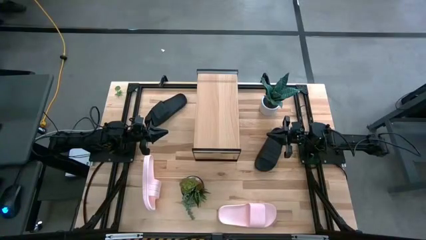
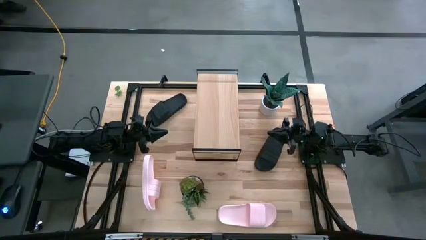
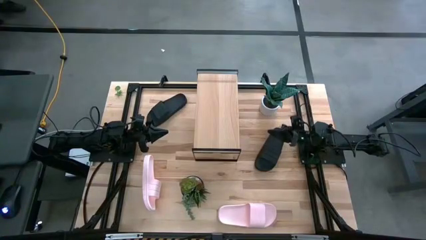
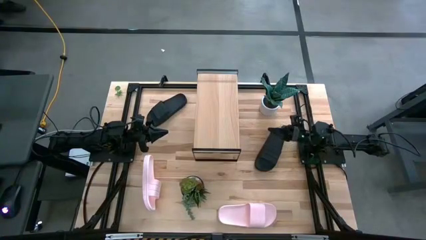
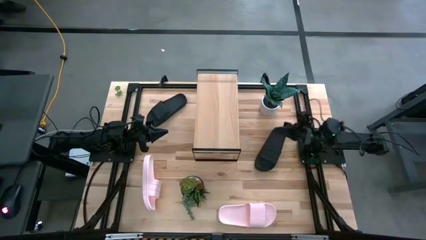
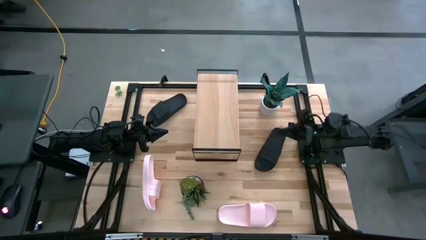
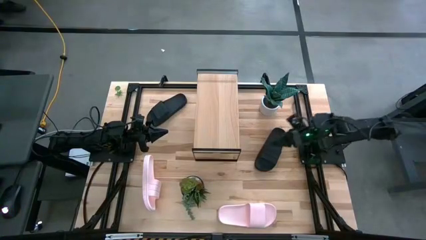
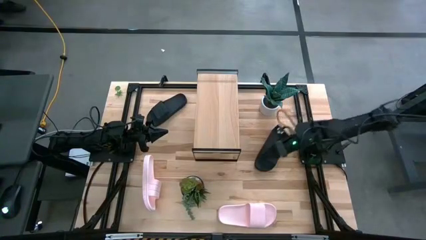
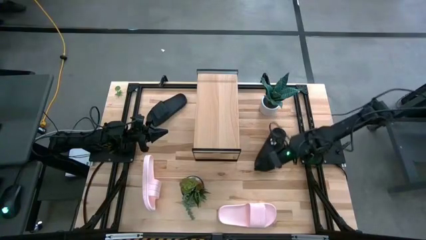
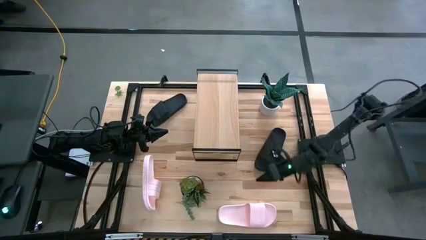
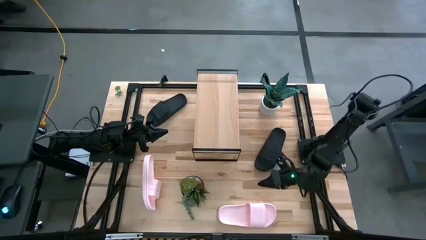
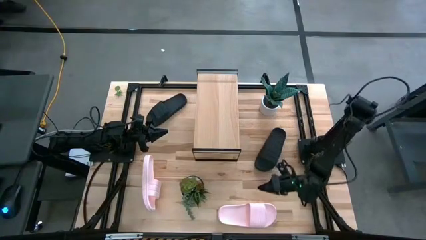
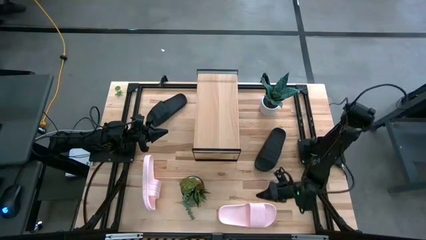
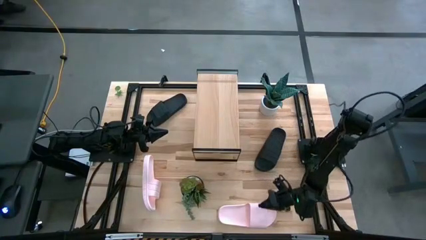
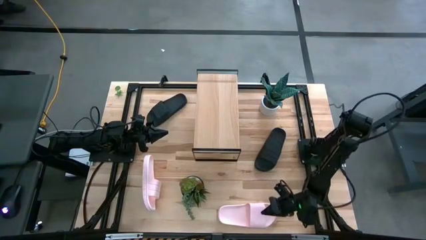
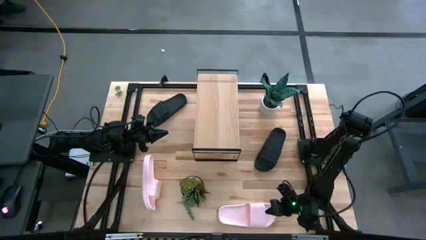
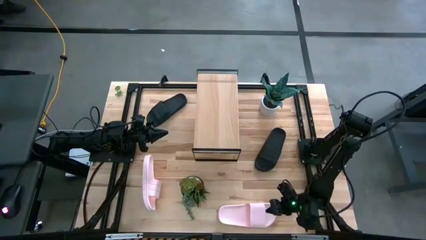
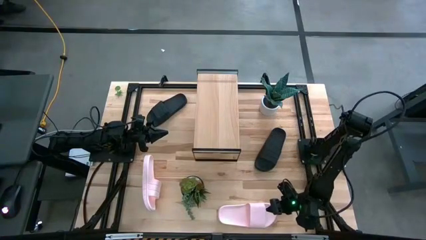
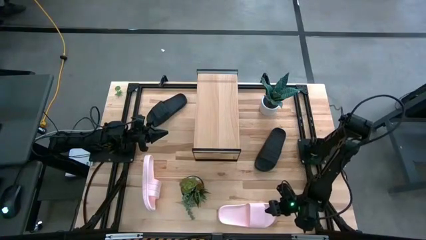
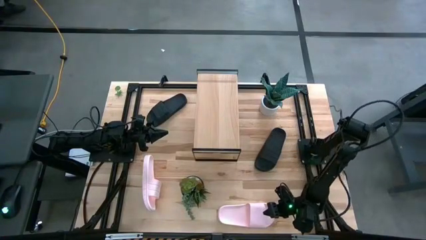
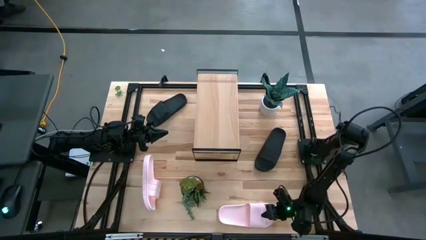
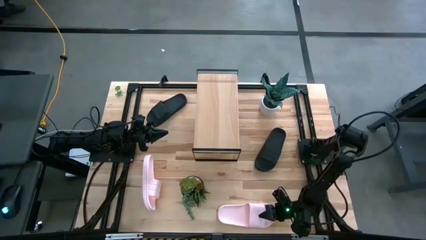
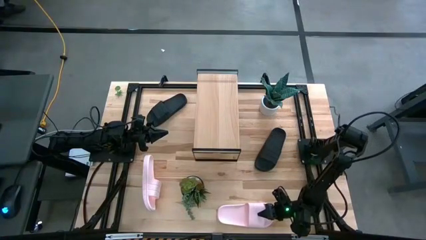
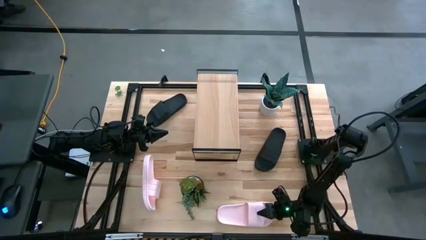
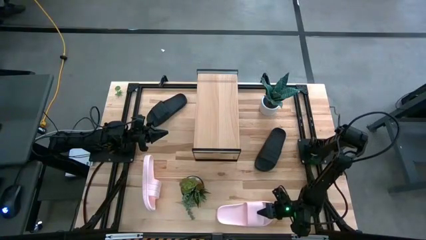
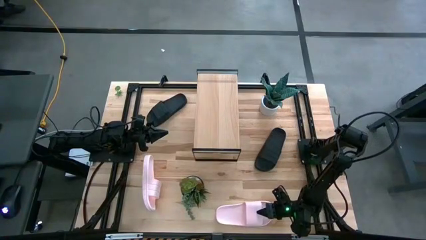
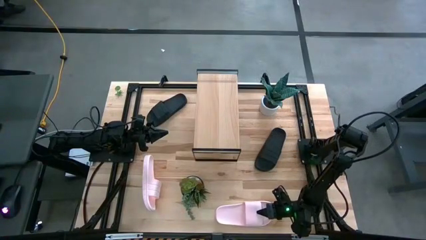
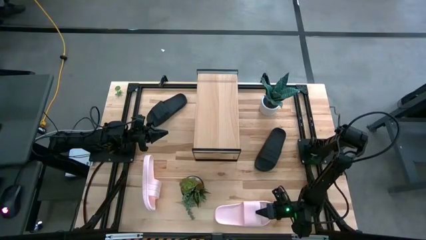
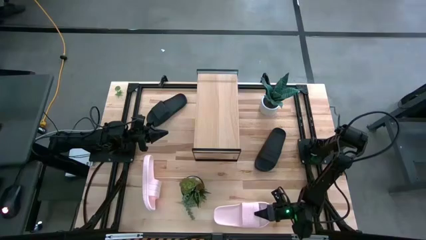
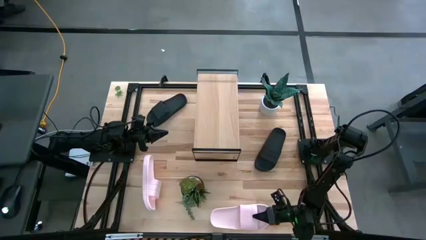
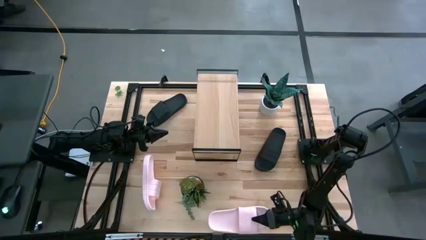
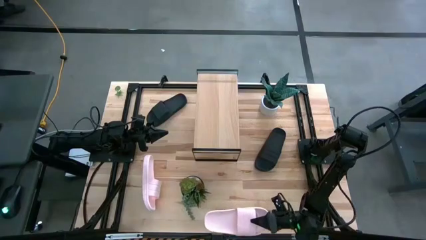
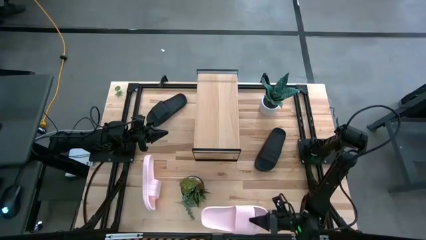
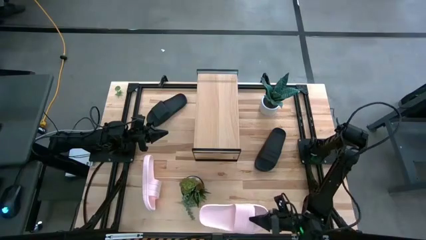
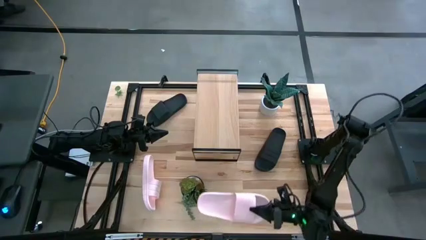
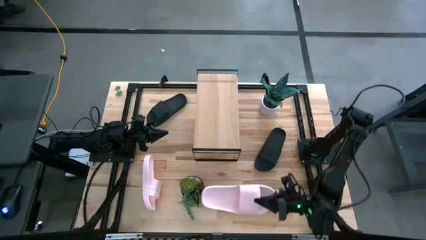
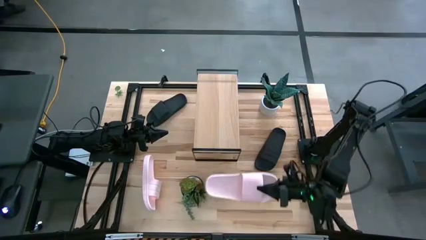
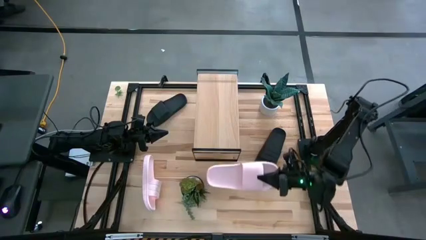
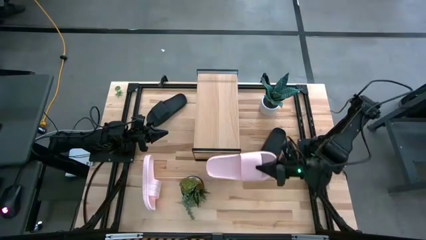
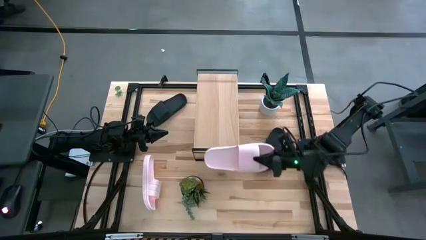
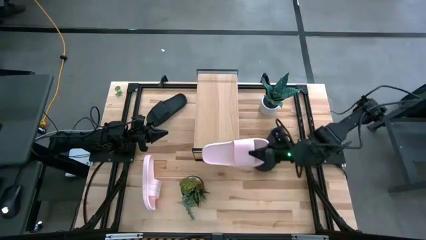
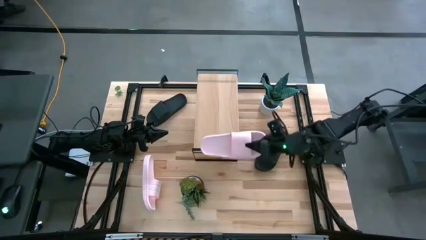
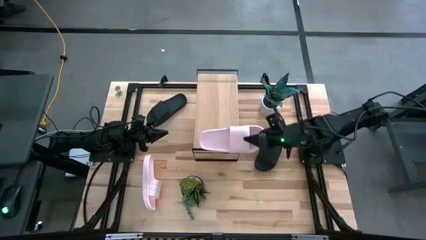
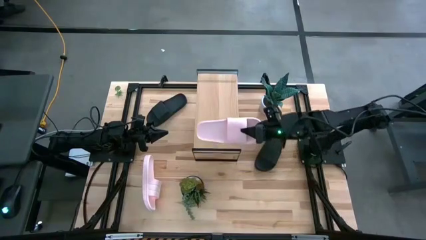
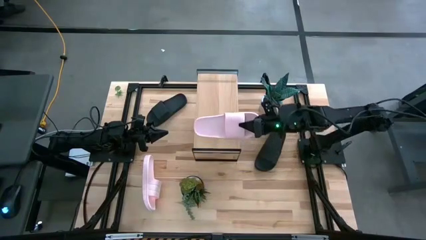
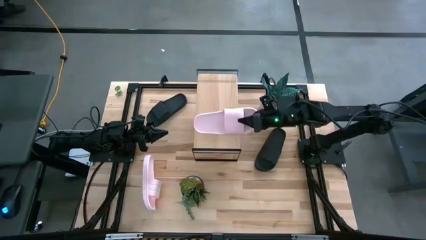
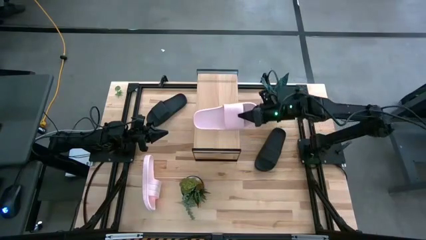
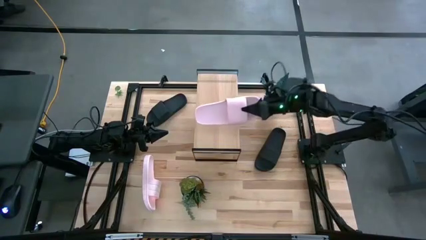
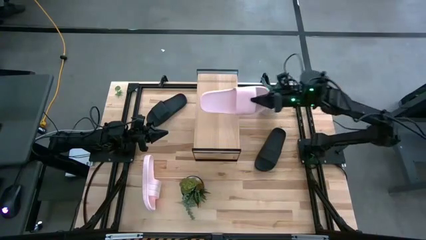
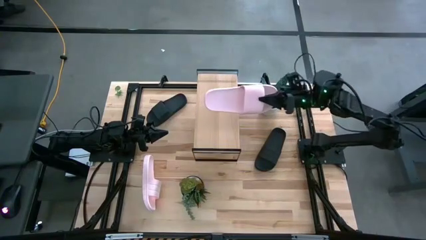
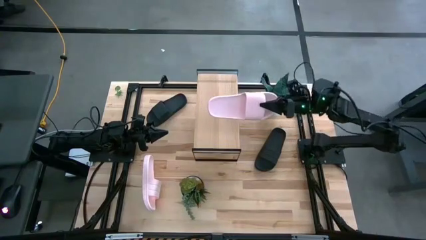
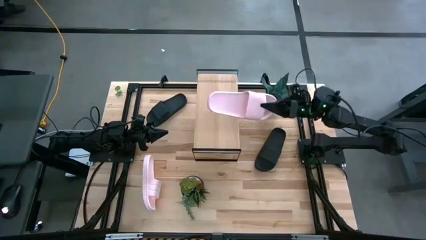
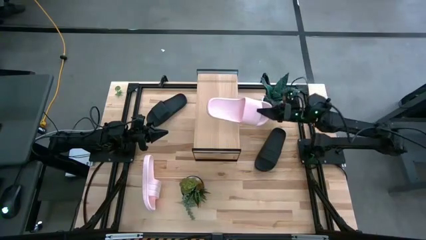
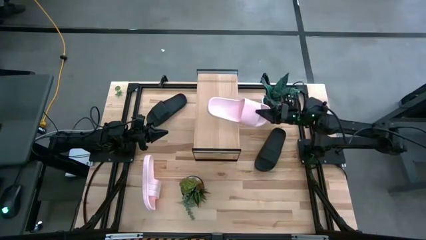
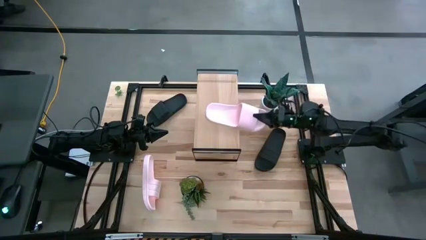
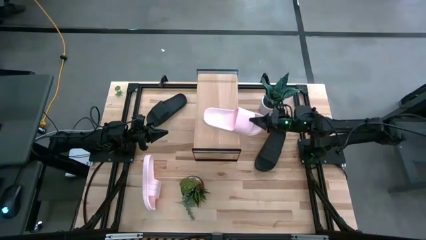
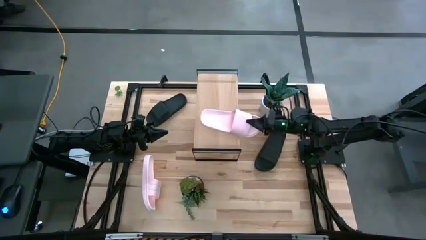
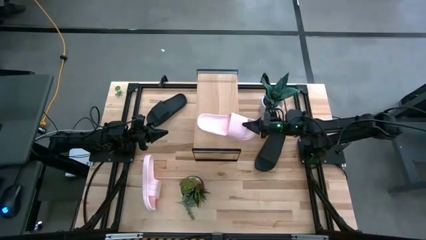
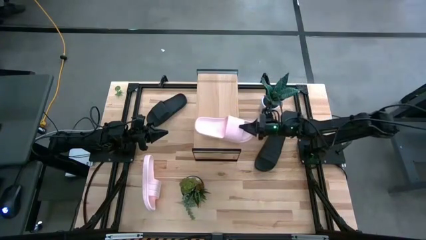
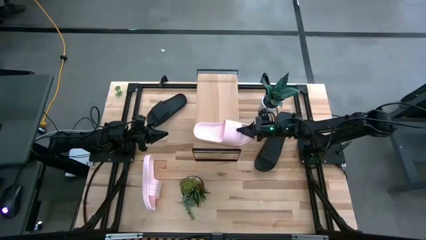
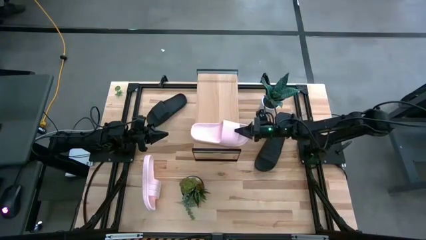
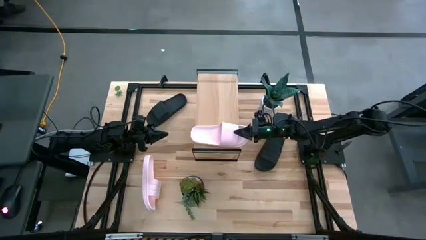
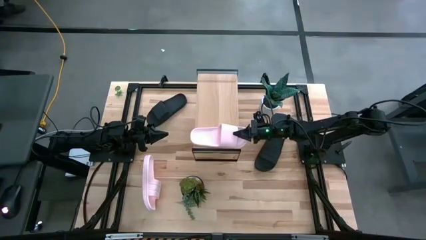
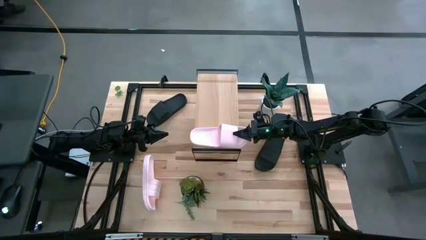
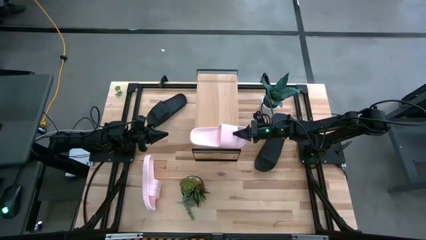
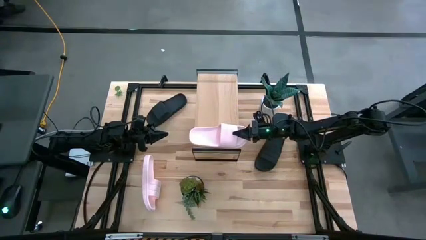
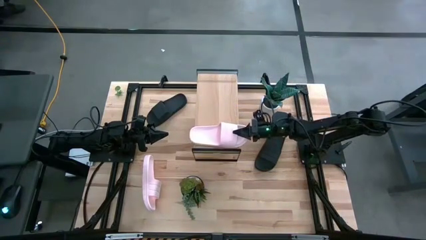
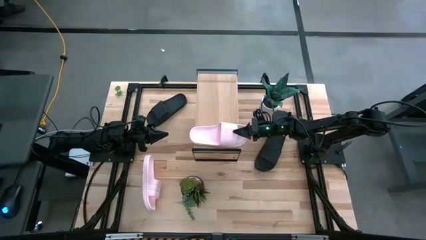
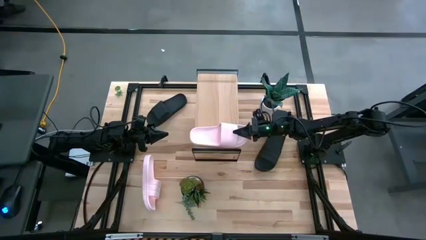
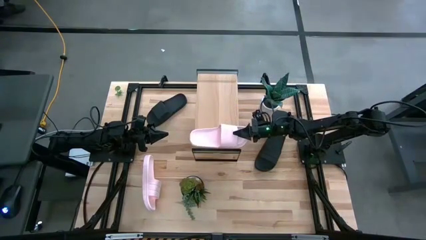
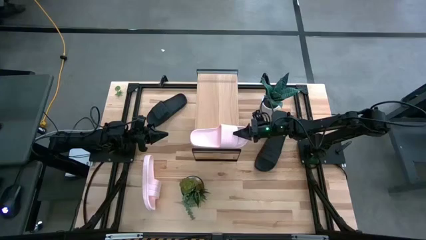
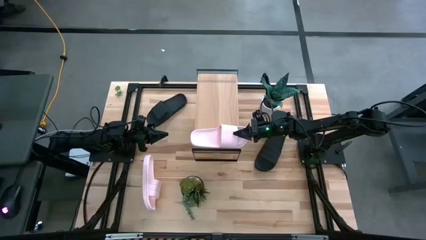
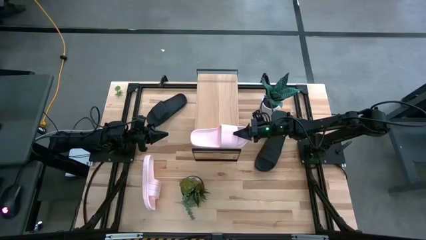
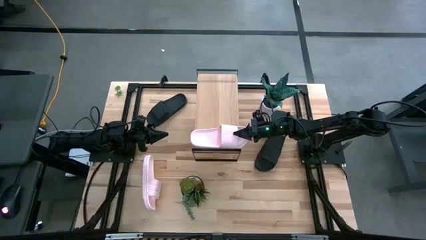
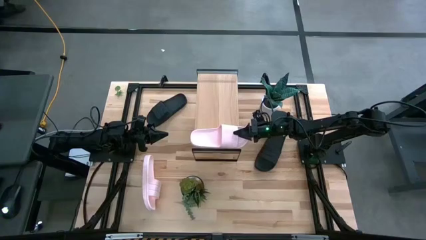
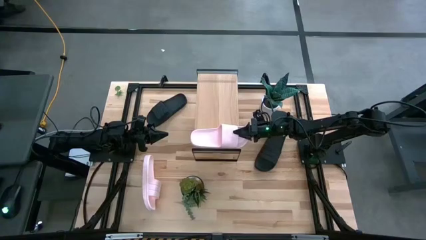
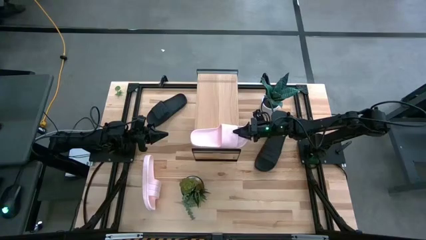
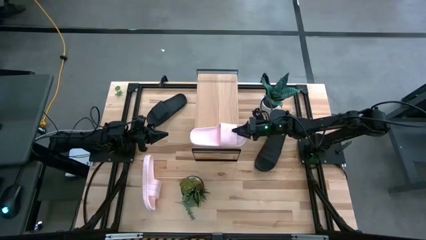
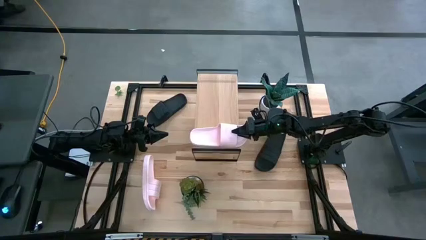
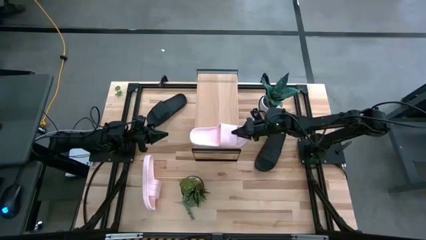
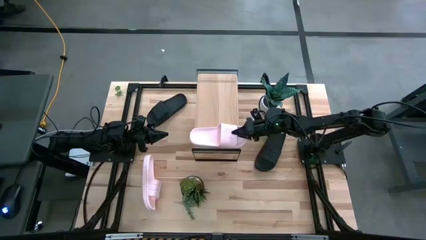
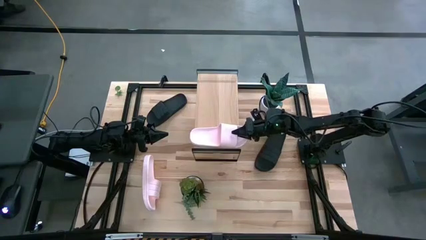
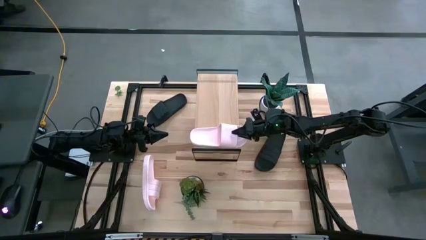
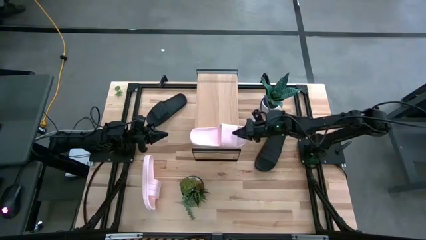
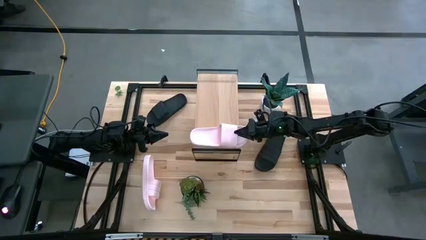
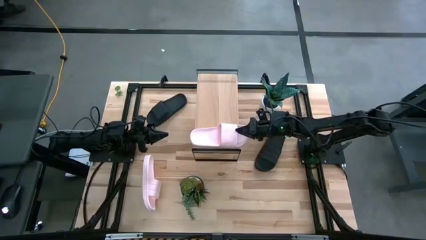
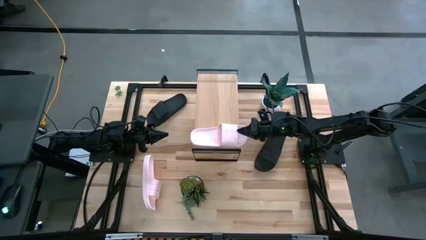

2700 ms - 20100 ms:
Task: Pick and place slides into the shelf
Put the right pink slide on the shelf
